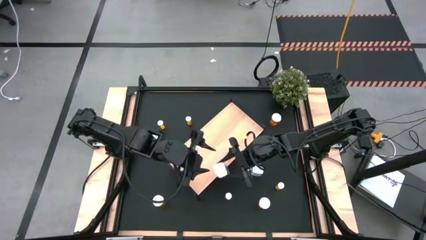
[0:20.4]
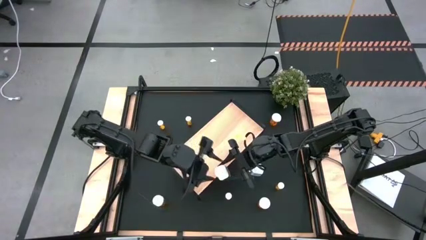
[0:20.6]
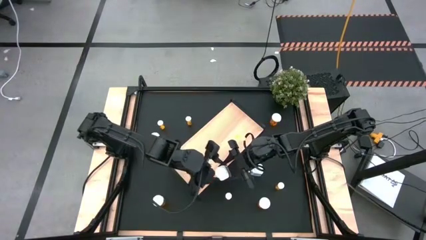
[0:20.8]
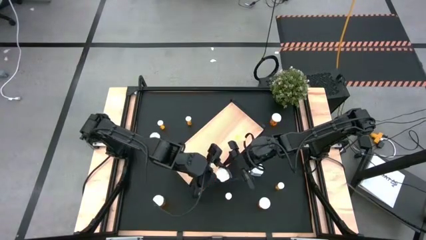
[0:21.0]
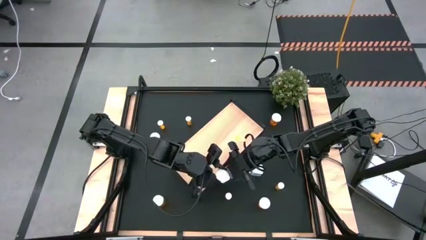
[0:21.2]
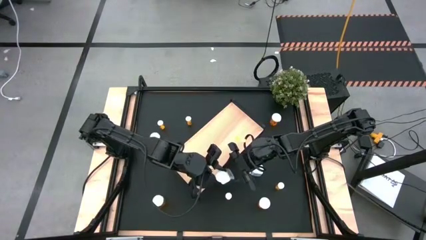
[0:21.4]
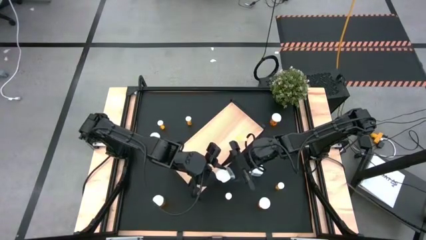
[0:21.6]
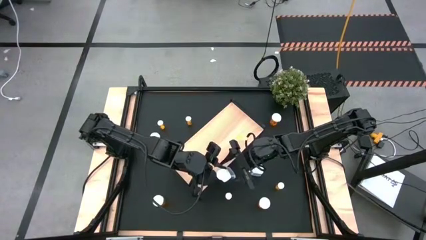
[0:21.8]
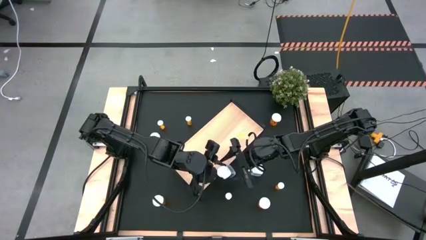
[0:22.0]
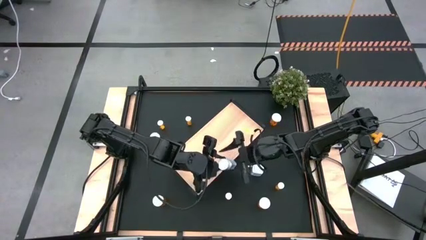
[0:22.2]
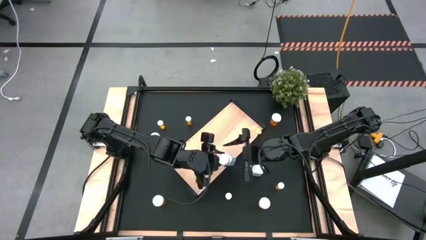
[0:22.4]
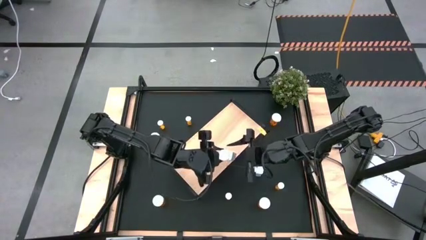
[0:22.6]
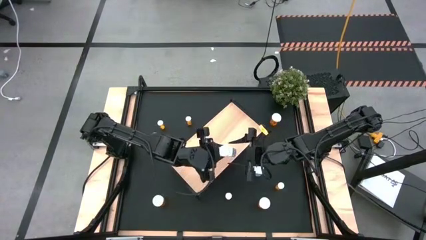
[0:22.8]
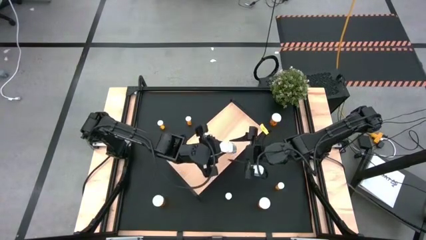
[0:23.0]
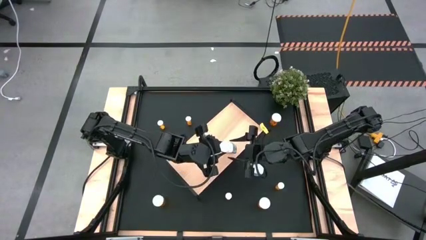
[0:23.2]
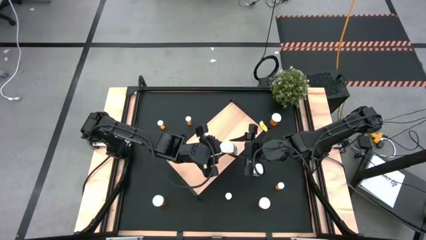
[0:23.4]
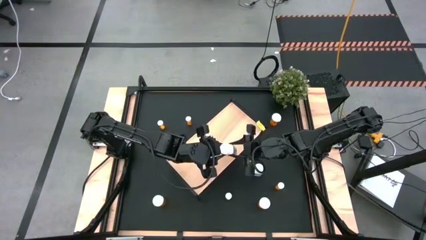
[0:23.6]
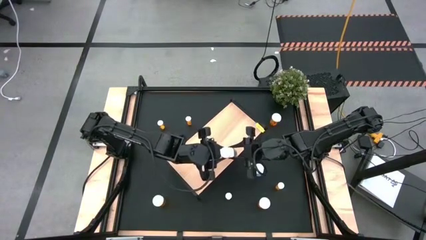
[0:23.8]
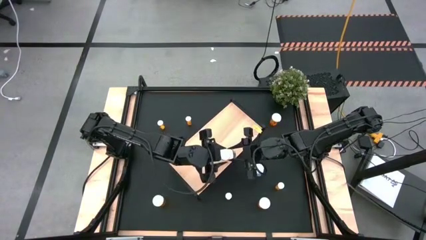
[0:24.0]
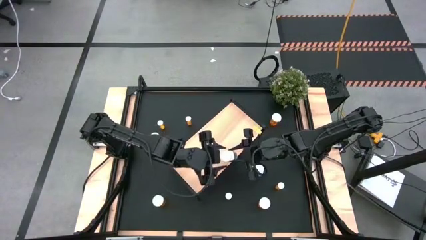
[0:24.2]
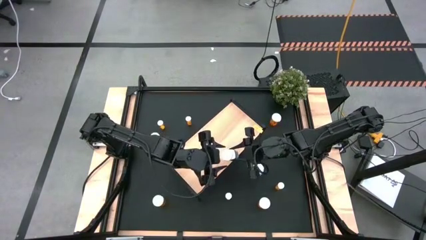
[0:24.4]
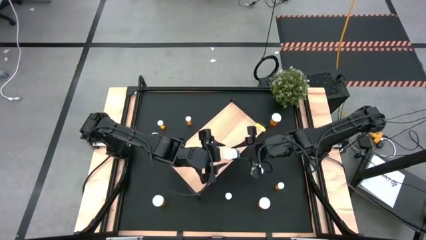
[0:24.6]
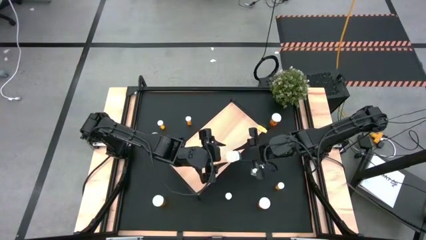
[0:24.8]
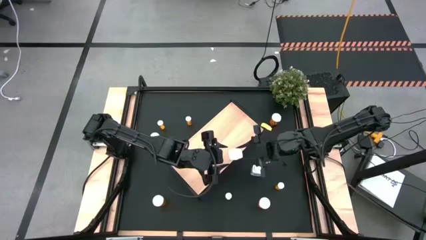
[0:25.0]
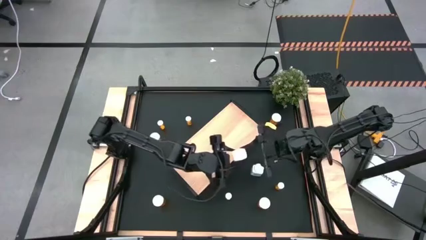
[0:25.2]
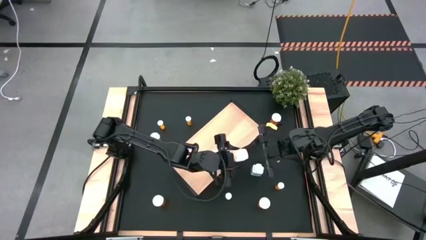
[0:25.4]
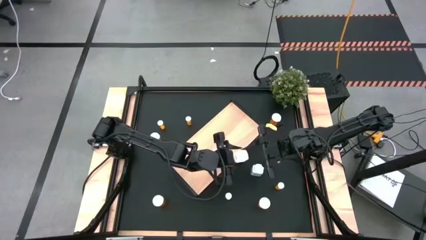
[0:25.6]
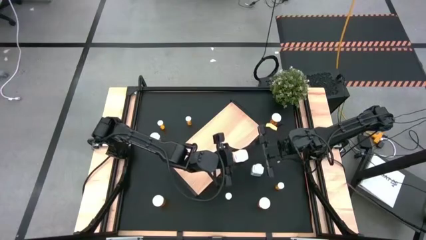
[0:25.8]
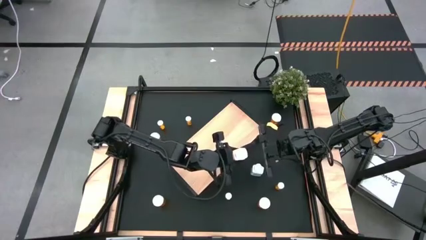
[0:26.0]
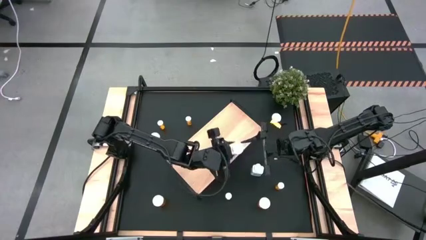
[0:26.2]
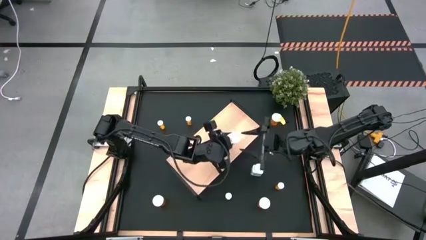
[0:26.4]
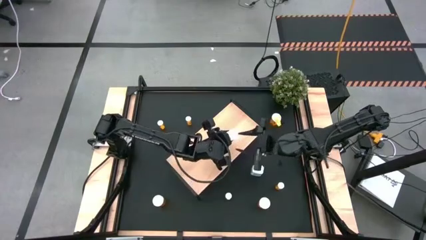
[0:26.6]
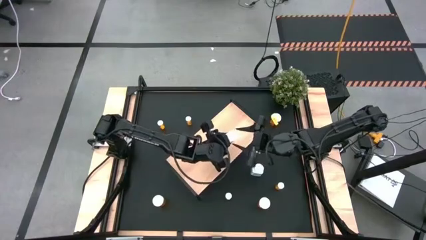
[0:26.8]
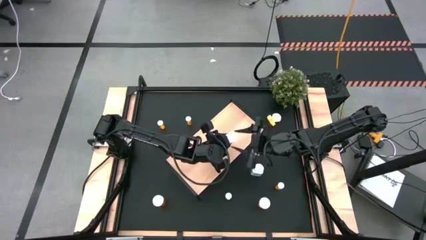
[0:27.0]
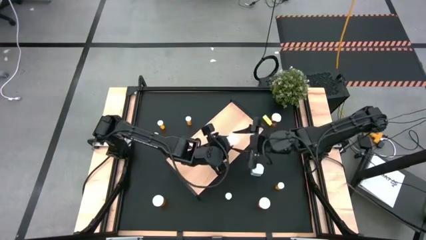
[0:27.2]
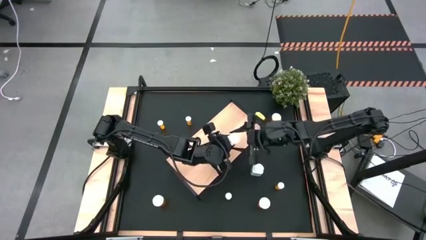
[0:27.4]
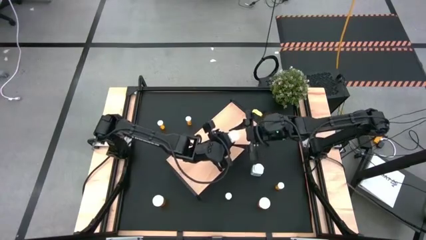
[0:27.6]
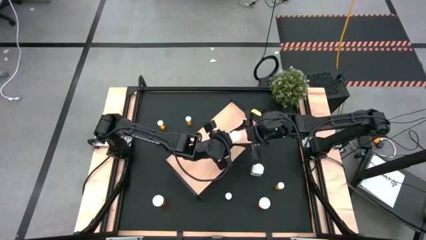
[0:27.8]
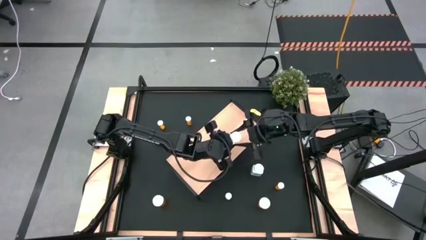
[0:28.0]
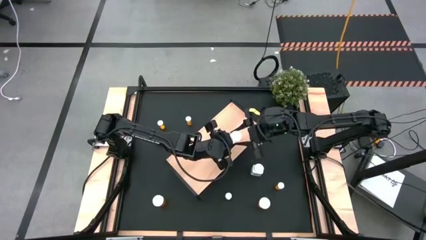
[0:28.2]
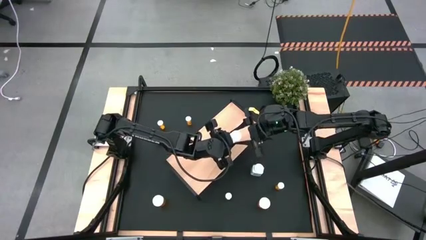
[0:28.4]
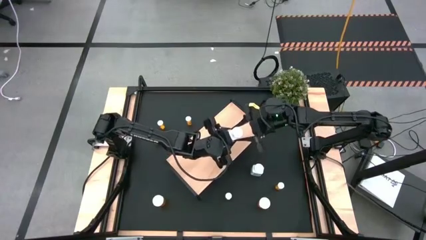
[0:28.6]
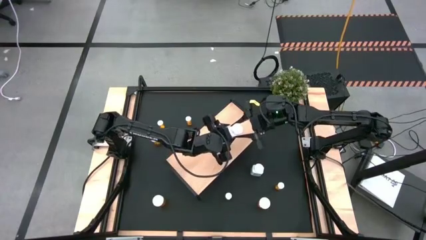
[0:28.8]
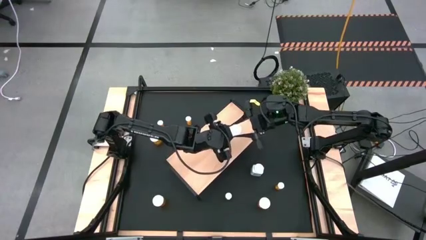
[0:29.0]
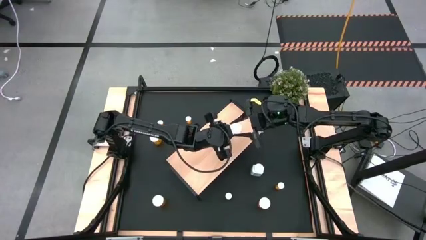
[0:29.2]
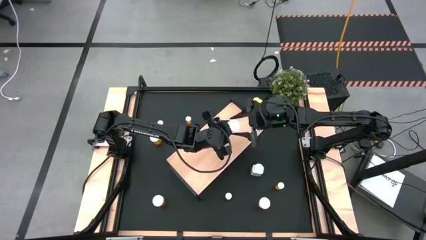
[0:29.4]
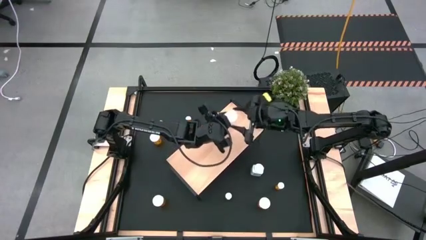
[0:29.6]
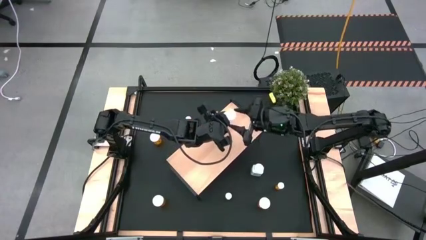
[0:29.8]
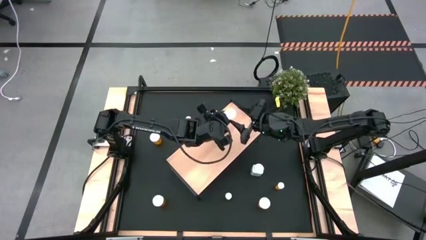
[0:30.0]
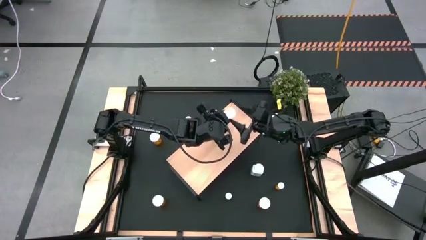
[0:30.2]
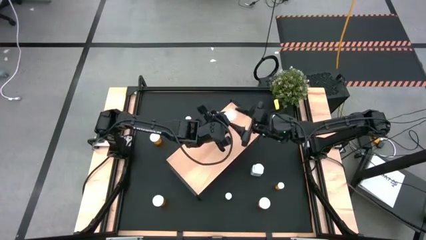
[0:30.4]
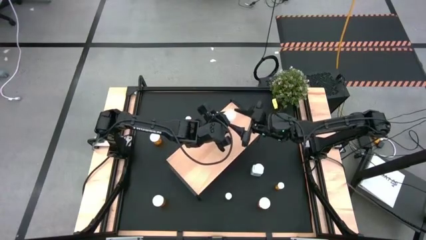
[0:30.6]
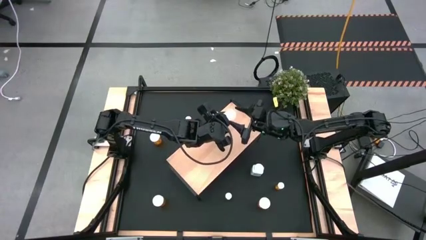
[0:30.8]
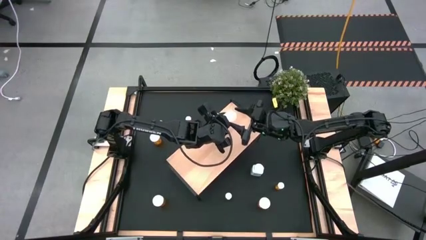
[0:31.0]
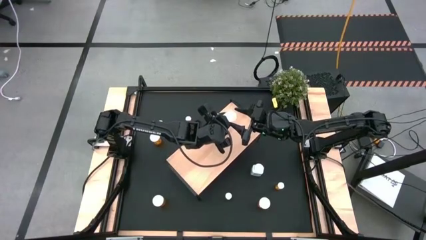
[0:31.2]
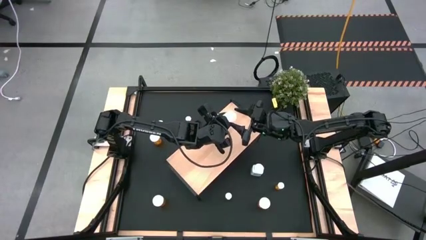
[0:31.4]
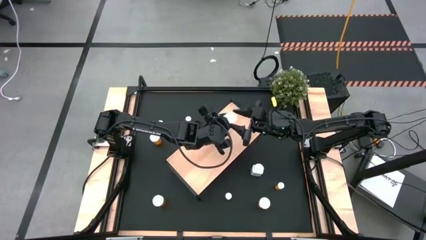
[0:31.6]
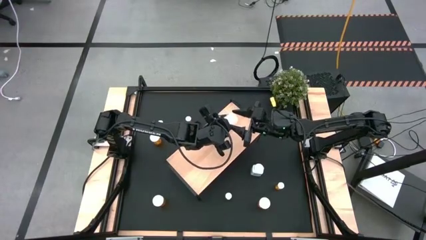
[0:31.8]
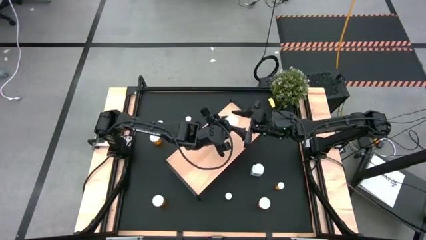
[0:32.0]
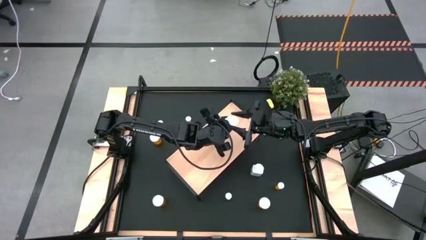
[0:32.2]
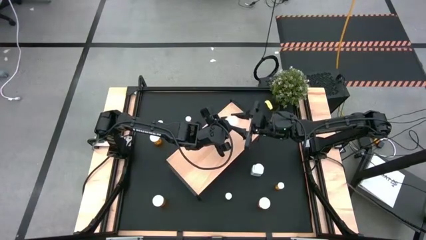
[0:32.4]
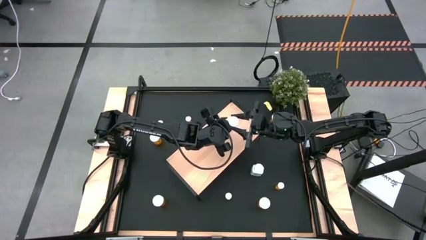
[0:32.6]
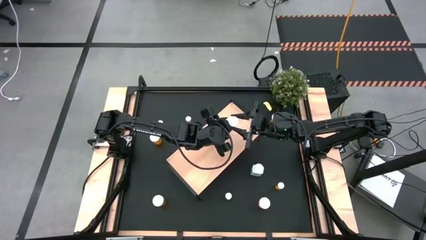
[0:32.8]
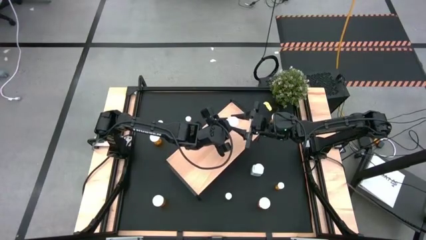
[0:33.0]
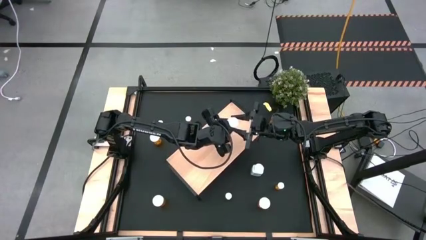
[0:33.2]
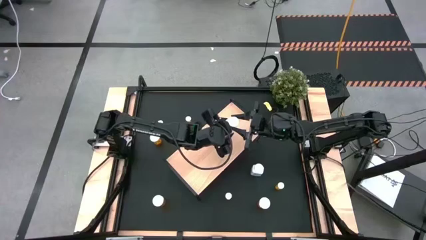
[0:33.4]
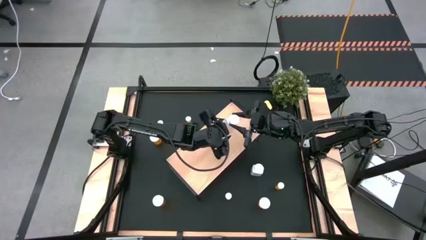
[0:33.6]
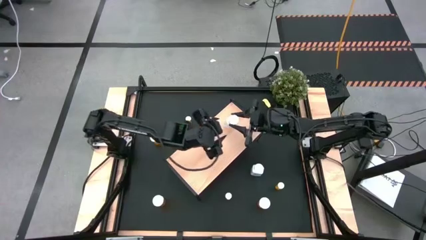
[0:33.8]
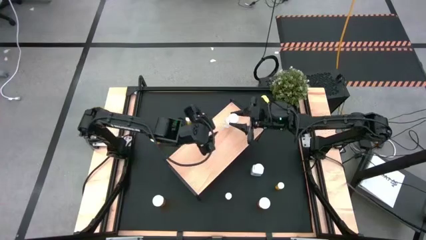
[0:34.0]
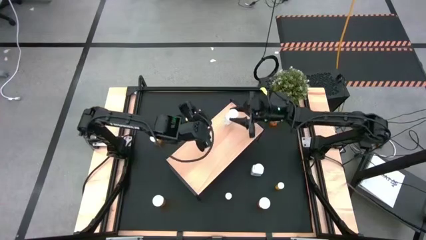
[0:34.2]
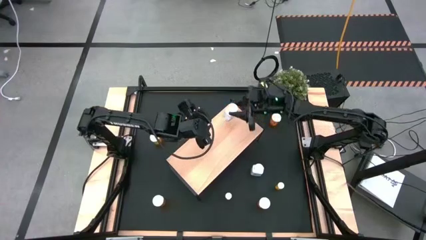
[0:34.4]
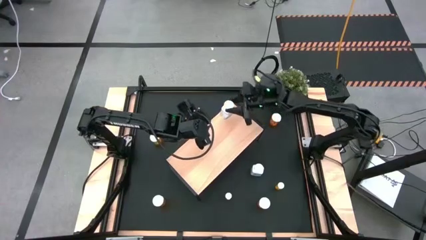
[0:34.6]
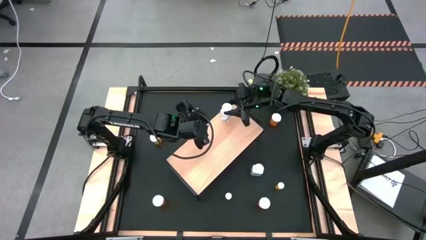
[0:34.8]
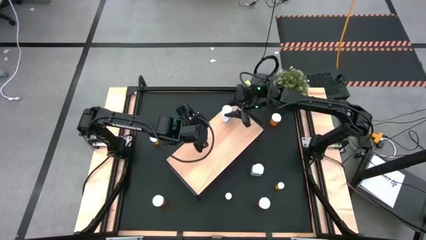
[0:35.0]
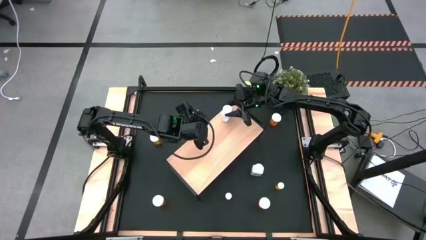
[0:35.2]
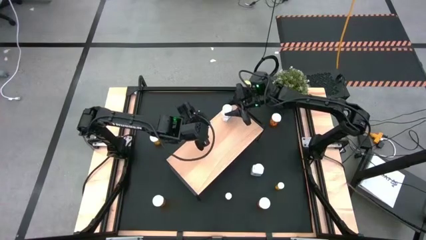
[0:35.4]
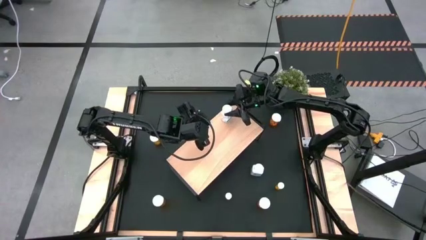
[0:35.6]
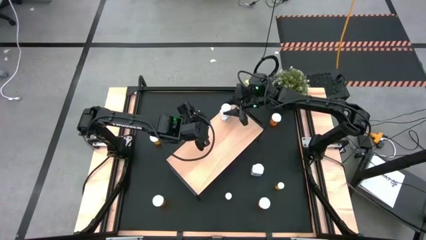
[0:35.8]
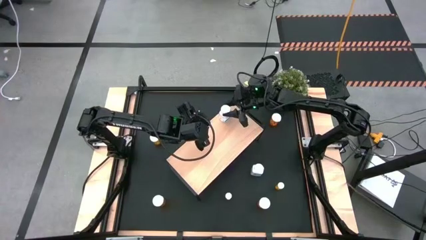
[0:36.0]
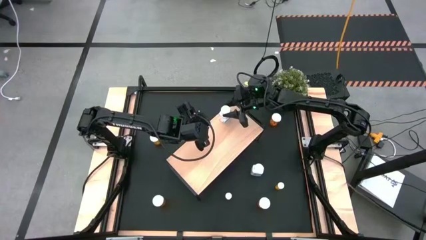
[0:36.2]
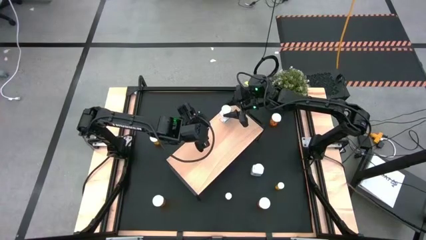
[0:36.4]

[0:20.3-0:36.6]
Task: Pick and place medicine bottles onto shelf by color
Put the white pill bottle on the shelf
